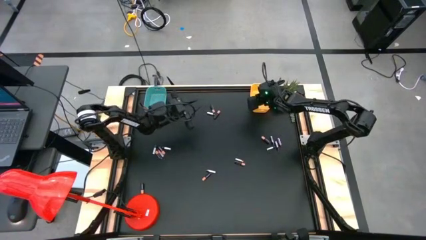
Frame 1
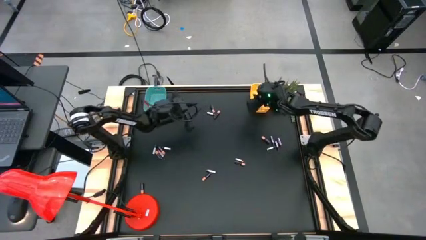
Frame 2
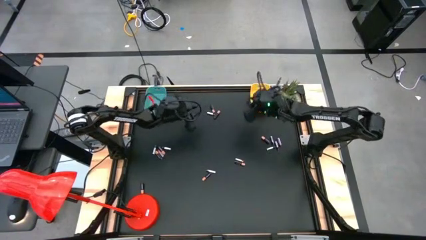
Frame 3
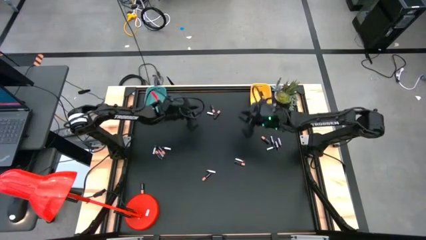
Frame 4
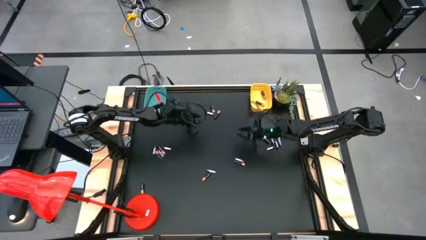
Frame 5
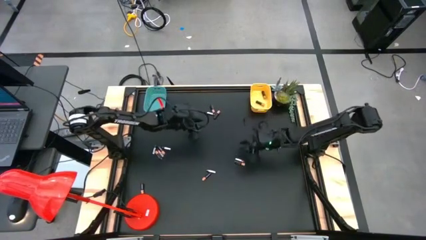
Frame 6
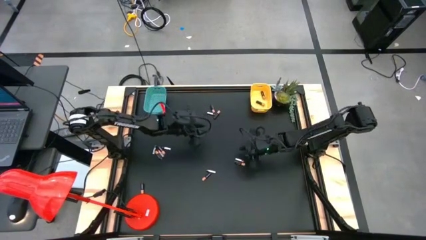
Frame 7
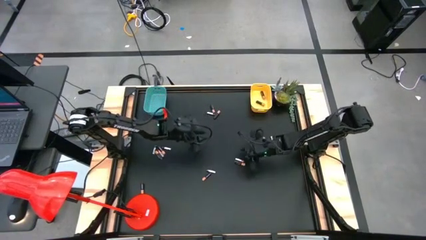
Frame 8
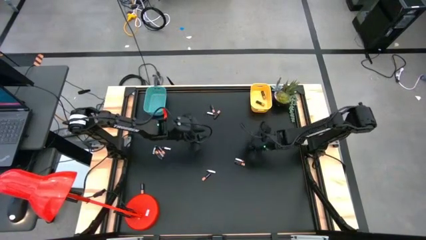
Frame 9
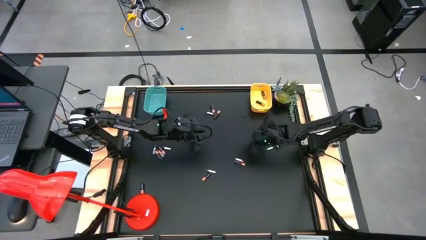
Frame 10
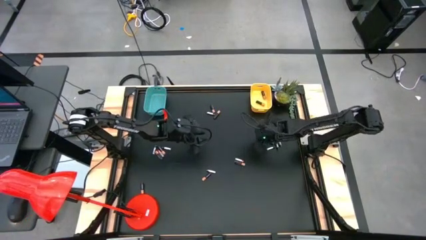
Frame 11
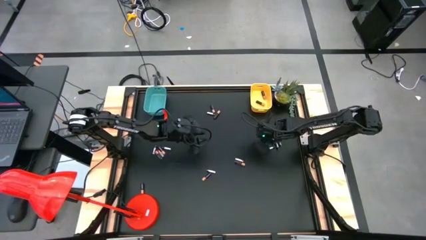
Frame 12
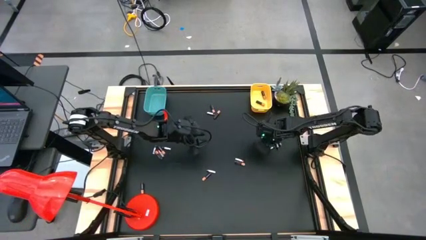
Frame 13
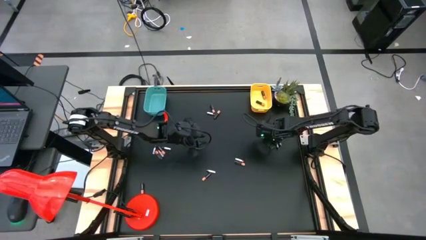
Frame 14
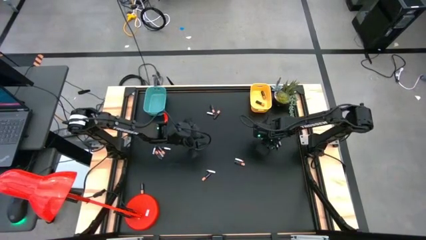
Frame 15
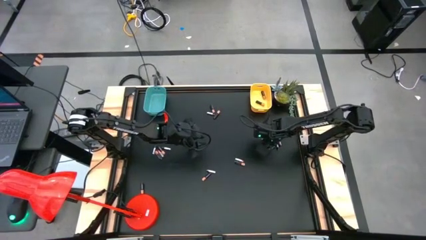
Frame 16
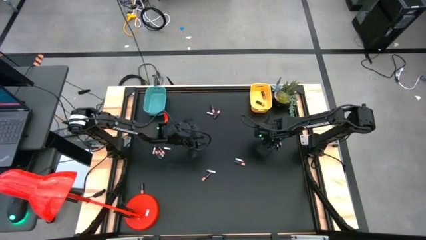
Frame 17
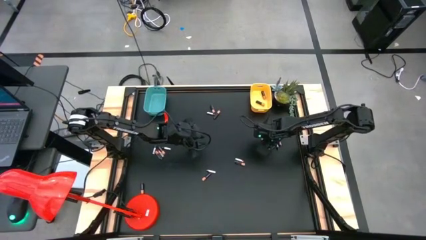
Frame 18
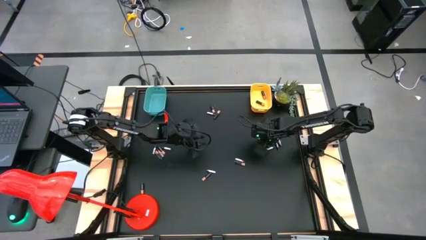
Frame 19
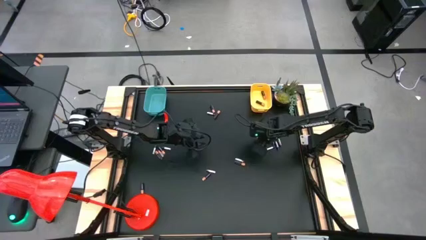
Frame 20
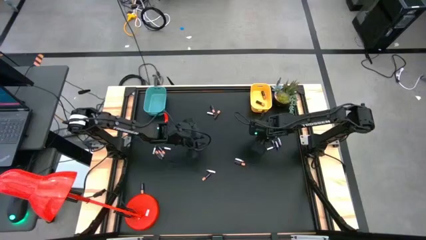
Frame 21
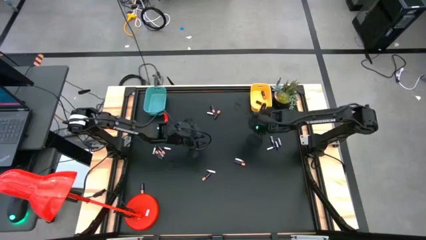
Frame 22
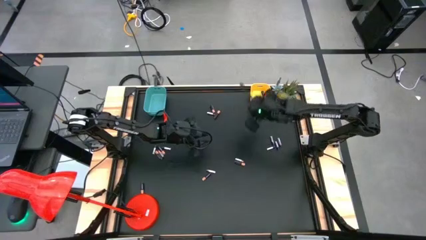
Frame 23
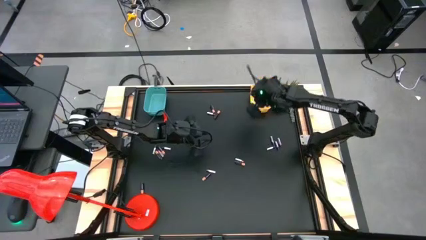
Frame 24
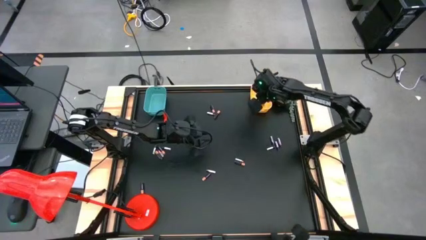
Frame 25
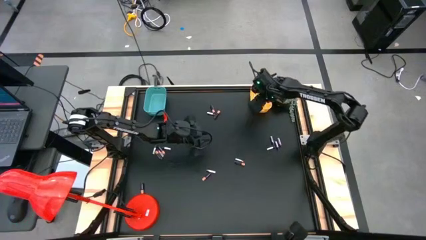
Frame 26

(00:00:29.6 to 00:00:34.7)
Task: Sort batteries
Put the black battery into the yellow bin

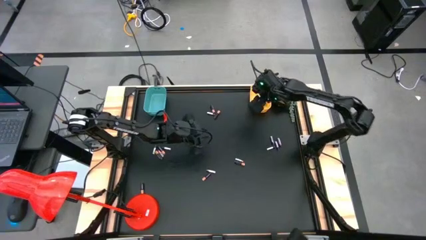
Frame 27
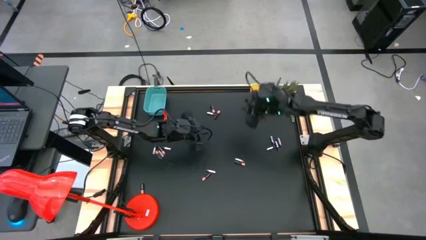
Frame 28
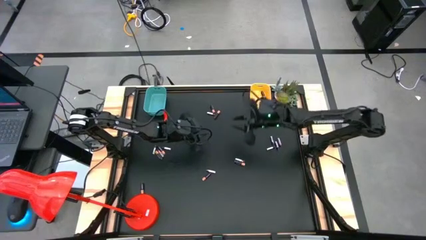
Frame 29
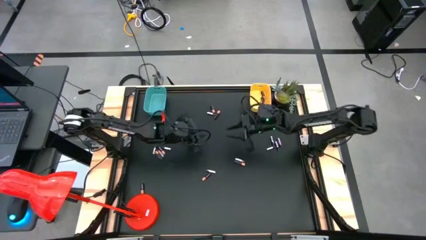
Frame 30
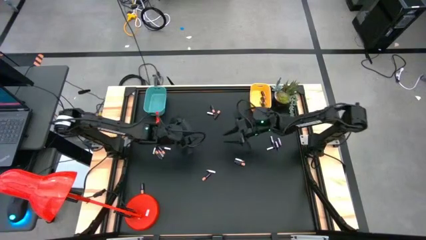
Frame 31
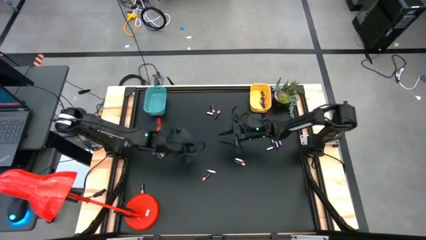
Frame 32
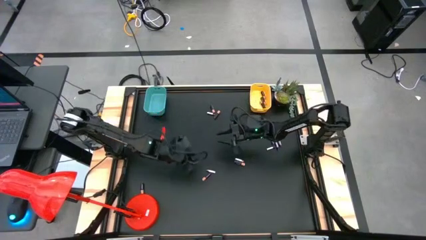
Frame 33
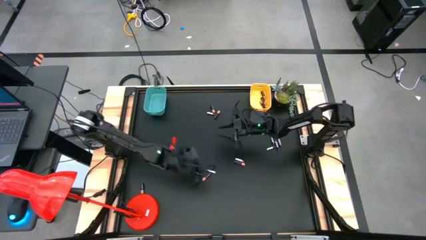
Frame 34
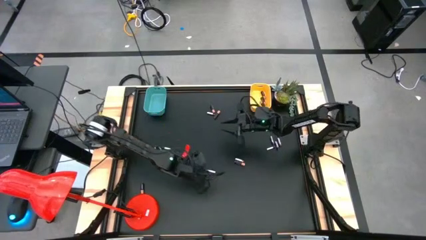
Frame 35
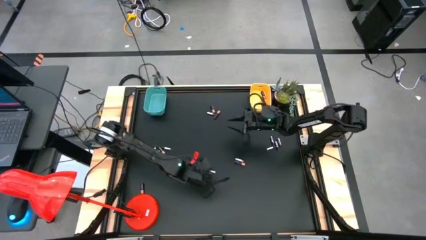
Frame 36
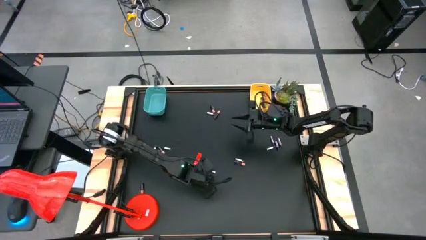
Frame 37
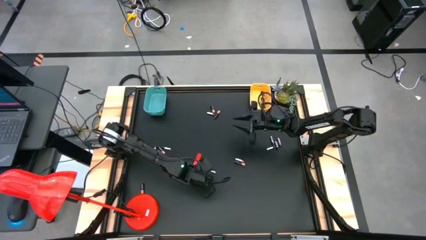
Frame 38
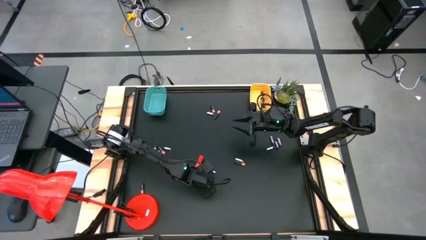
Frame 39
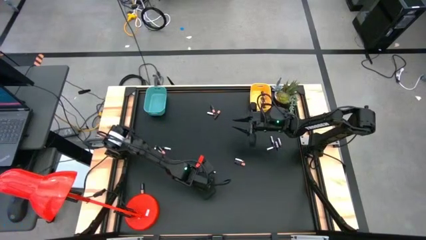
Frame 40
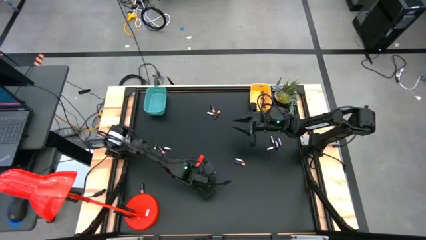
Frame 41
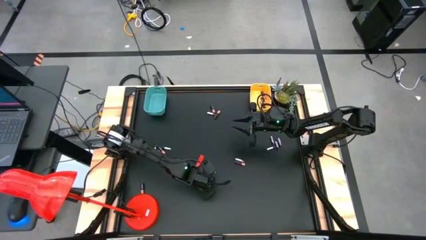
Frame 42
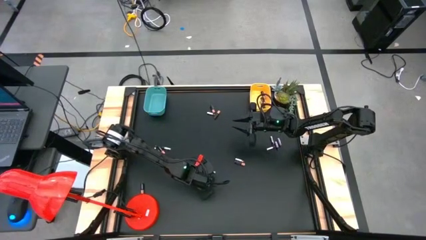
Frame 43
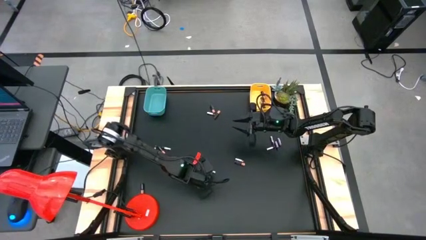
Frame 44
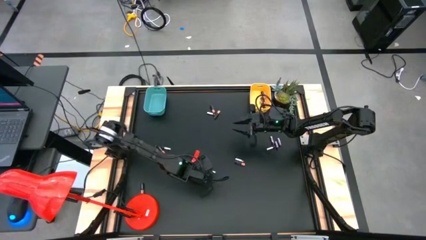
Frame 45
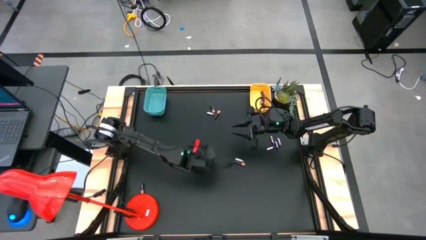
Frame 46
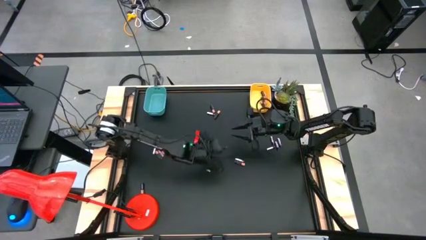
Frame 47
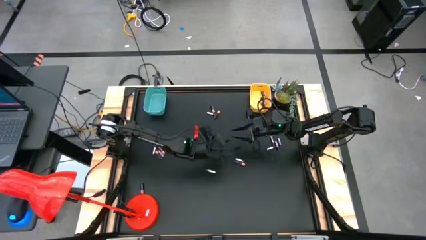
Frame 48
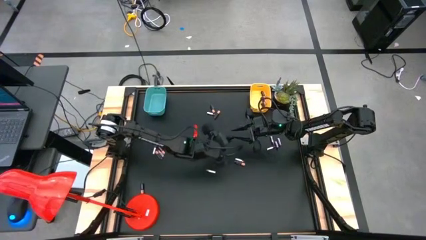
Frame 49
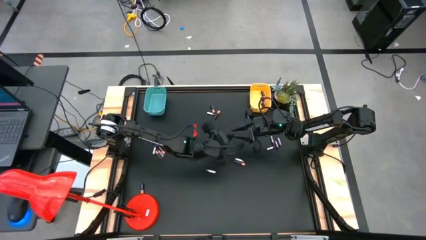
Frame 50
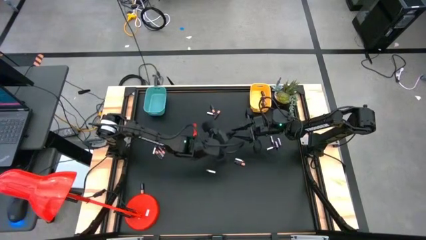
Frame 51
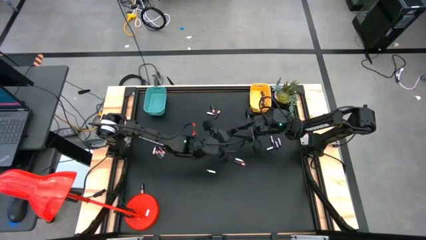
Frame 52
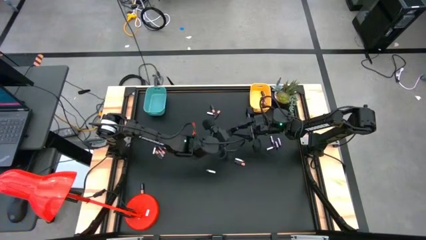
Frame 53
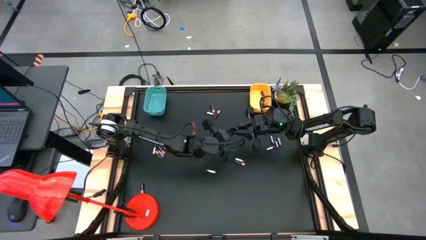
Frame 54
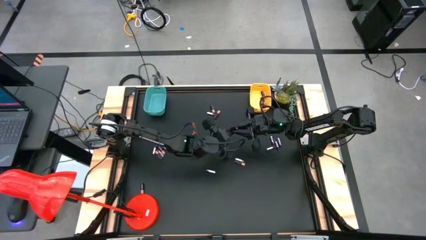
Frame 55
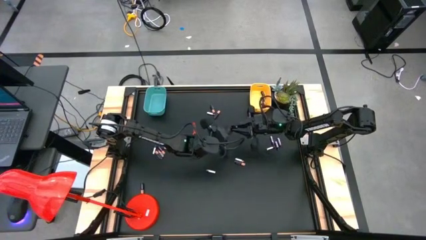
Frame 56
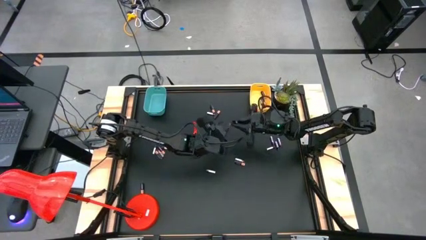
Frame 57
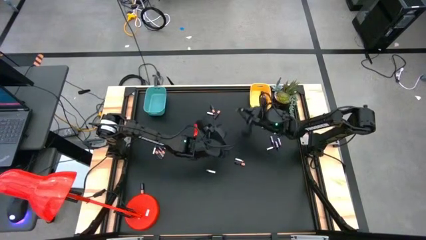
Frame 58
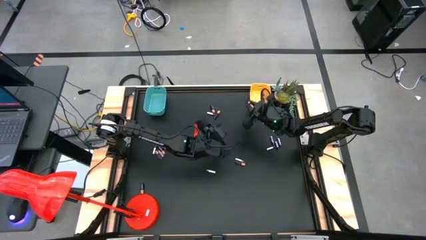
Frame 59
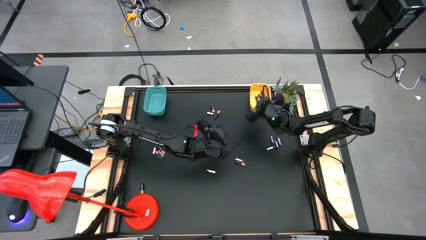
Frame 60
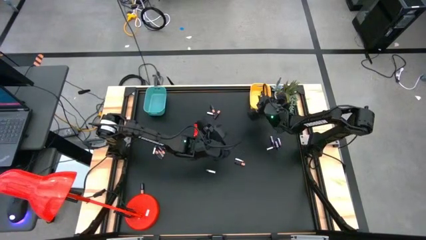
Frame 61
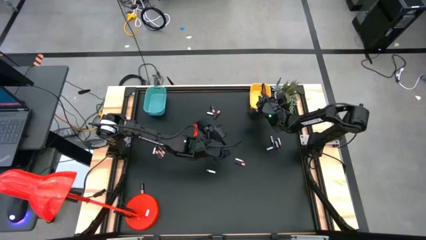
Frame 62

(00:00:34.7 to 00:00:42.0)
Put the black battery into the yellow bin

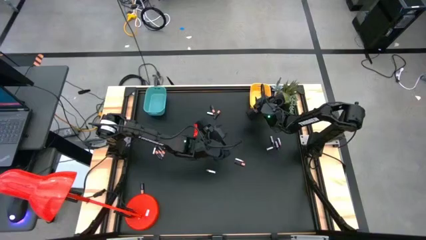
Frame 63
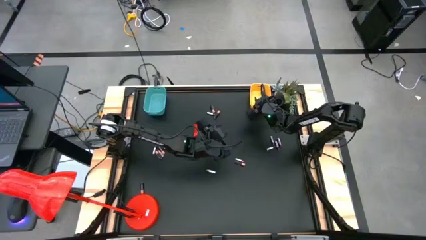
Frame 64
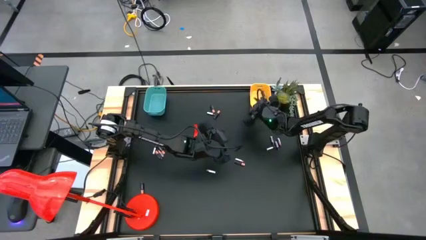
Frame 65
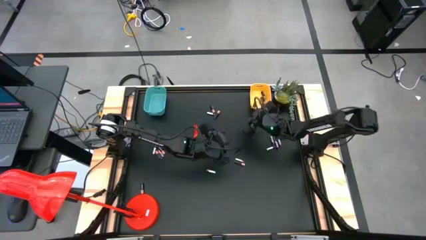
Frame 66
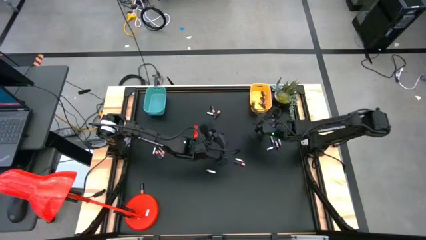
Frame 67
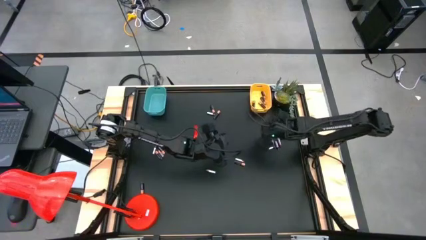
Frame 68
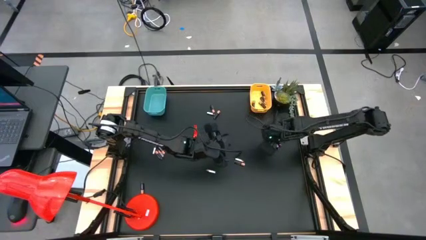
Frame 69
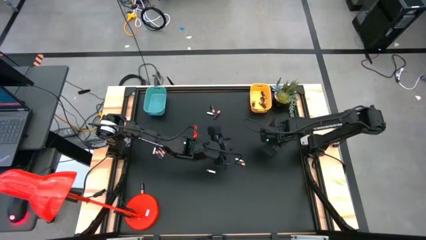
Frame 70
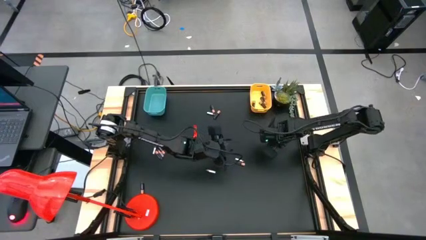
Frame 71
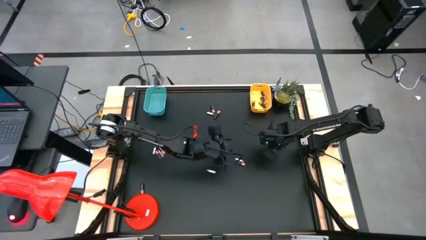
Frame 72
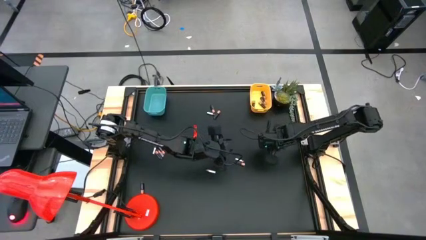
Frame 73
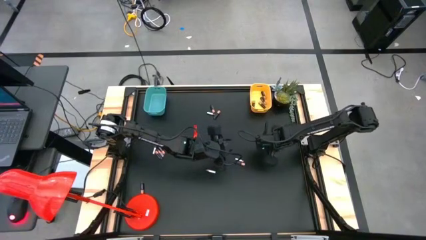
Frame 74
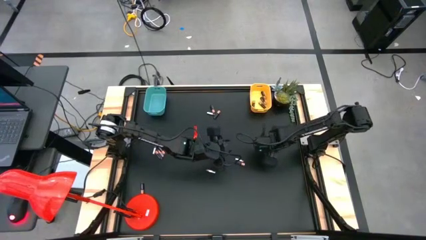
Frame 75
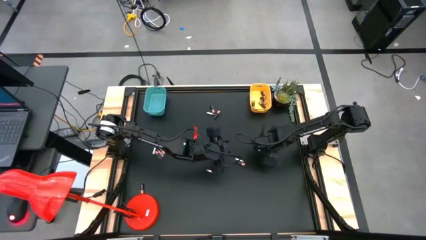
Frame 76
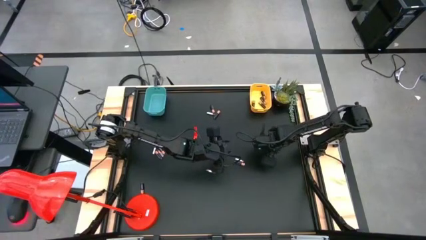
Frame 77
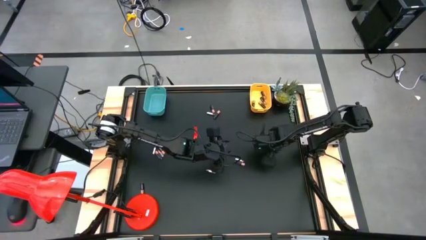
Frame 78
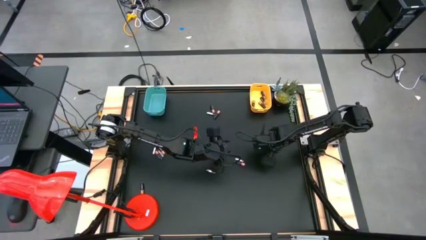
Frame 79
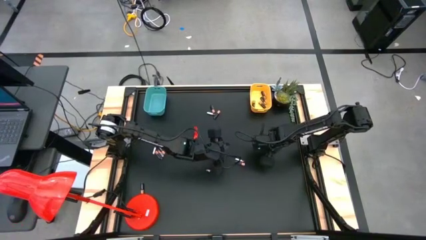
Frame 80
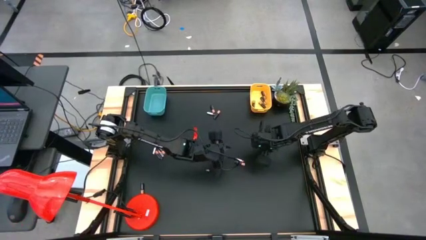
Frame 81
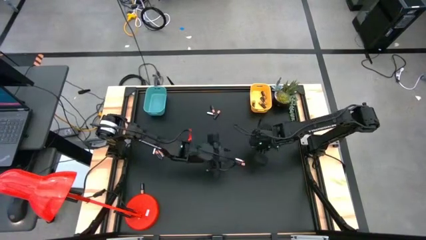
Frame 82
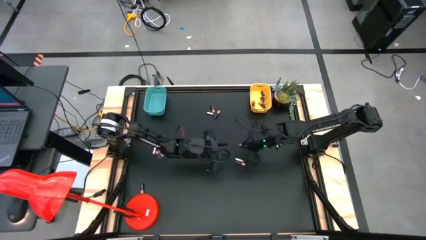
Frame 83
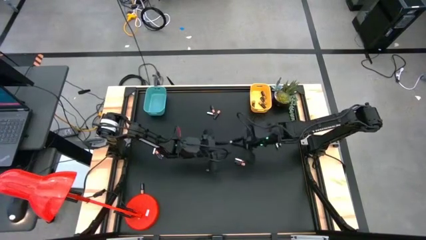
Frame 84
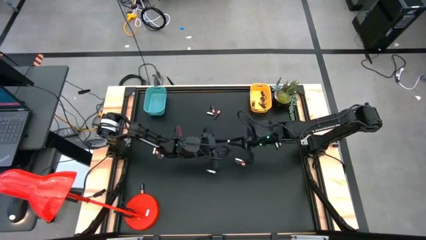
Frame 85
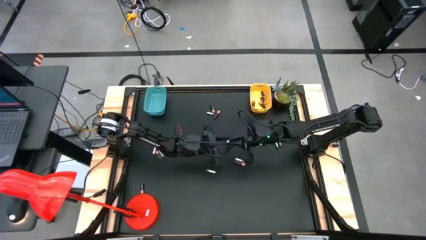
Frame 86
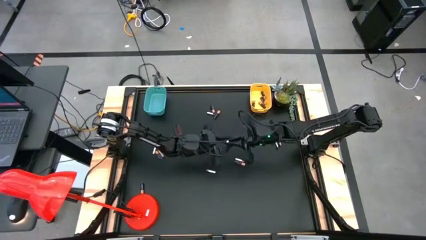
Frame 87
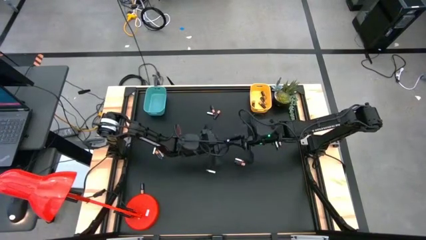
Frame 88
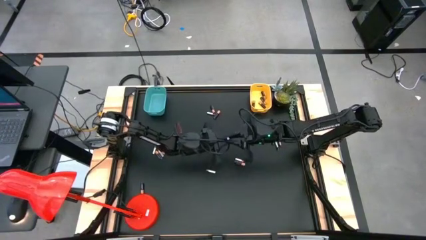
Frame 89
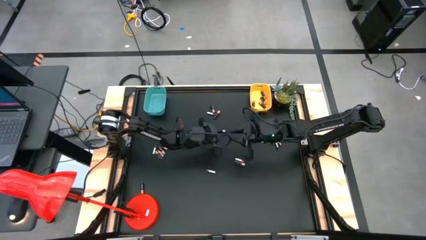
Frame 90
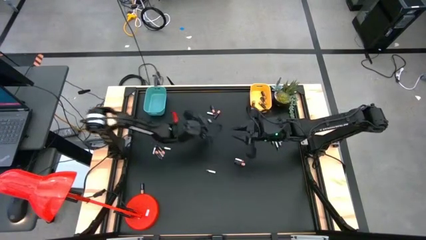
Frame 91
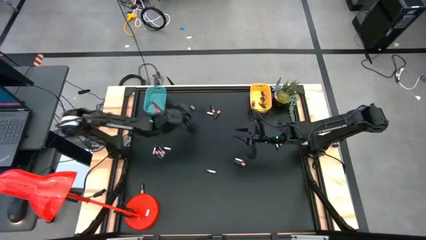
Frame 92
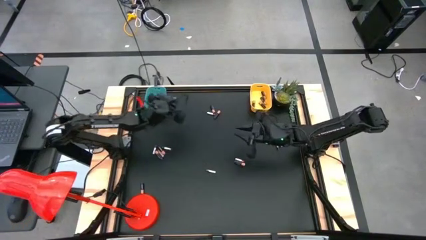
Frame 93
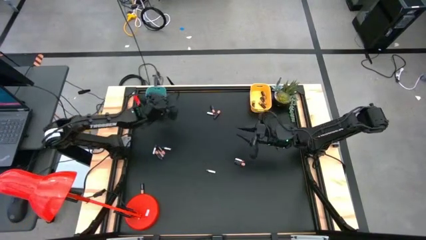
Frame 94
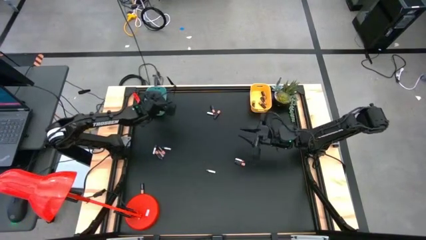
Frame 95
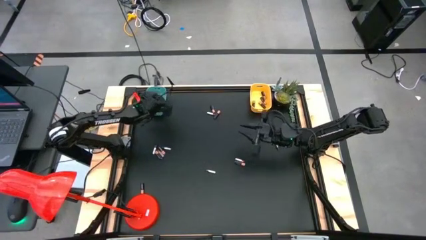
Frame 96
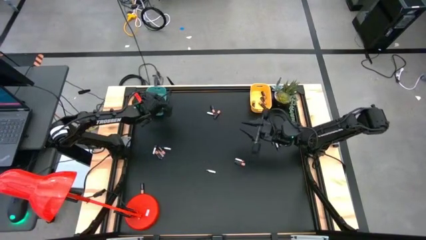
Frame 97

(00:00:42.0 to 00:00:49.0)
Put the silver battery into the blue bin
